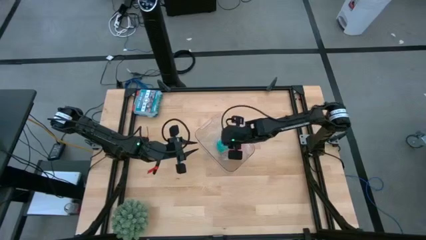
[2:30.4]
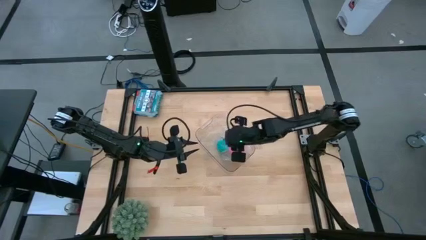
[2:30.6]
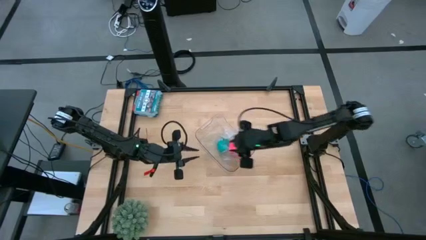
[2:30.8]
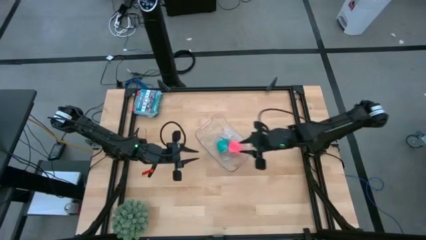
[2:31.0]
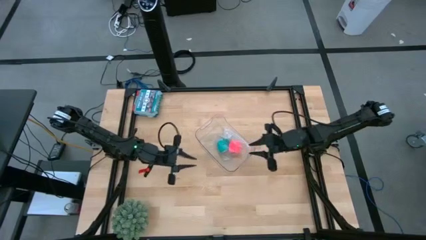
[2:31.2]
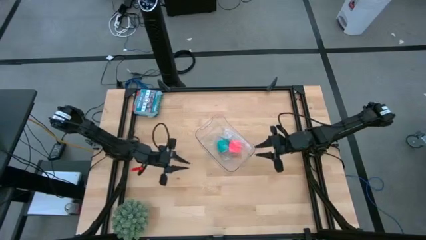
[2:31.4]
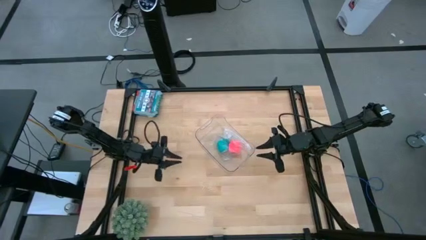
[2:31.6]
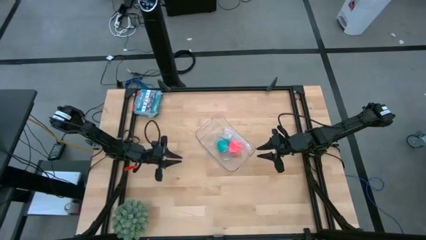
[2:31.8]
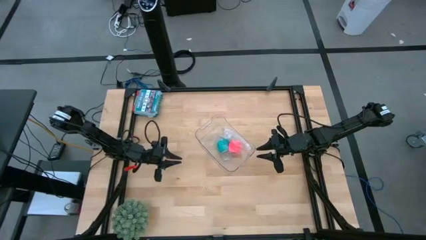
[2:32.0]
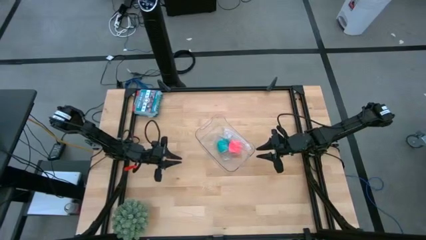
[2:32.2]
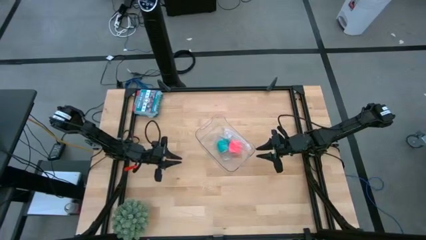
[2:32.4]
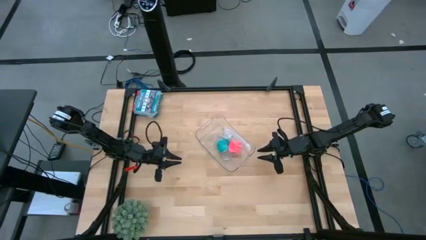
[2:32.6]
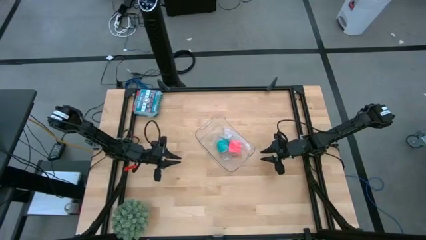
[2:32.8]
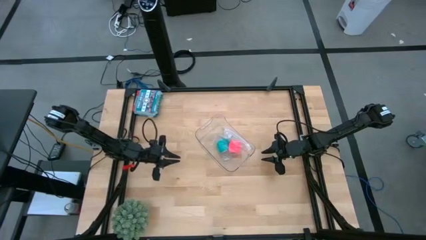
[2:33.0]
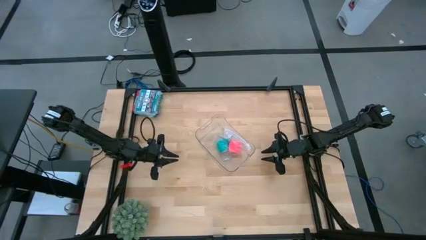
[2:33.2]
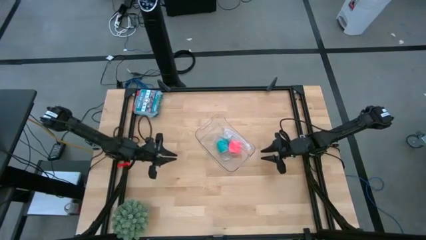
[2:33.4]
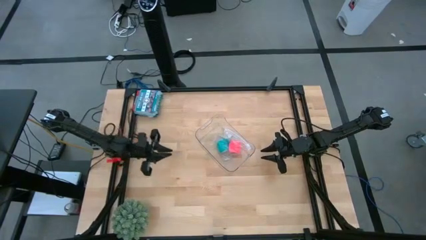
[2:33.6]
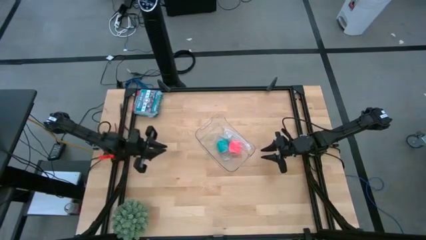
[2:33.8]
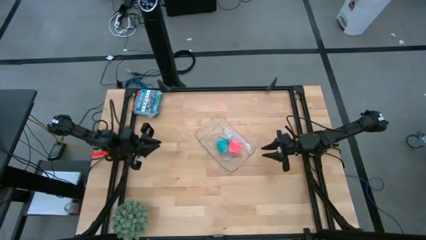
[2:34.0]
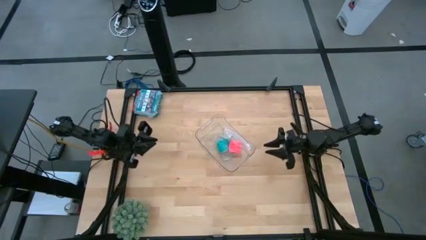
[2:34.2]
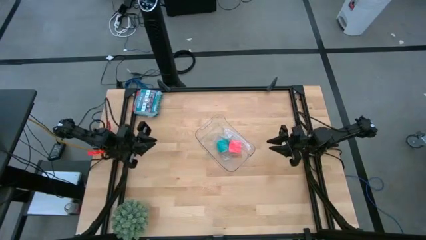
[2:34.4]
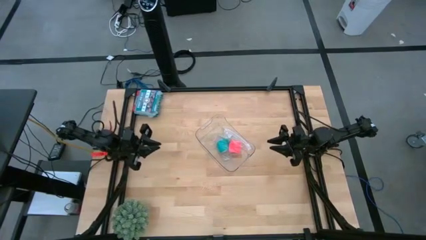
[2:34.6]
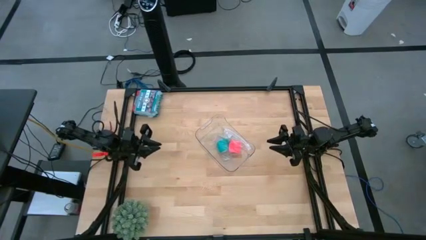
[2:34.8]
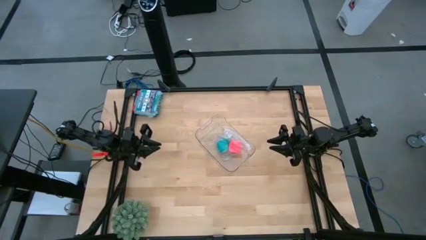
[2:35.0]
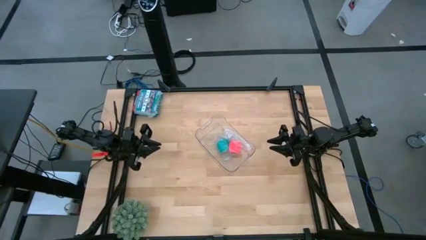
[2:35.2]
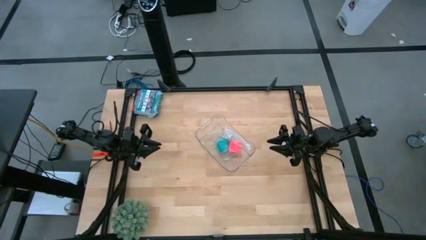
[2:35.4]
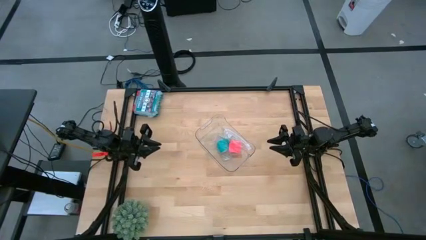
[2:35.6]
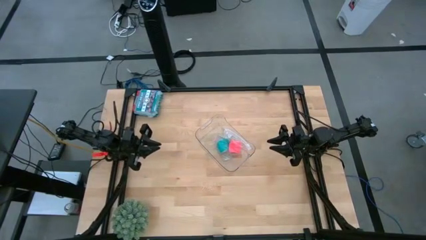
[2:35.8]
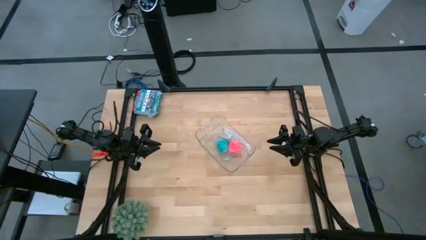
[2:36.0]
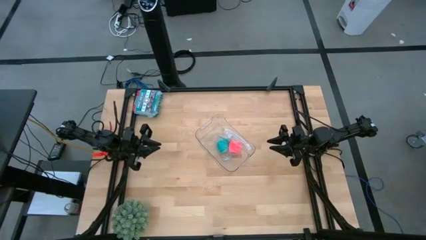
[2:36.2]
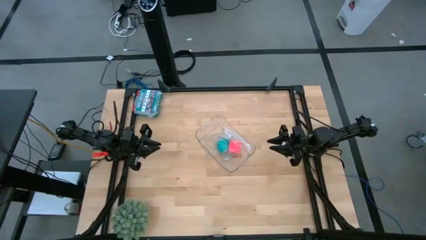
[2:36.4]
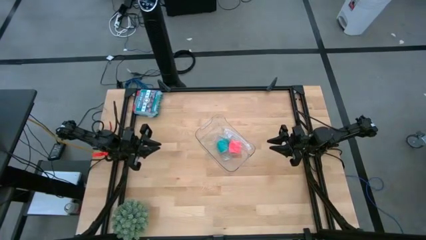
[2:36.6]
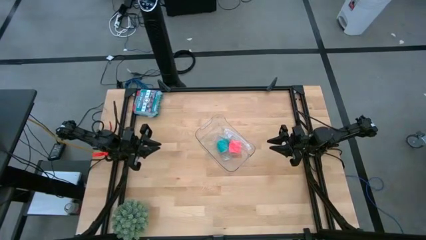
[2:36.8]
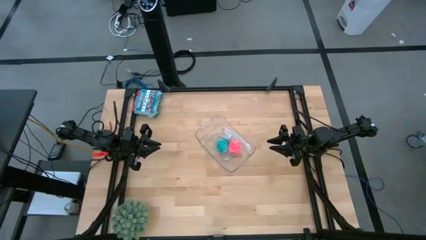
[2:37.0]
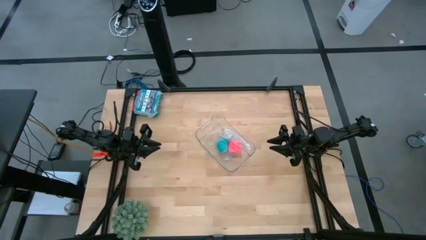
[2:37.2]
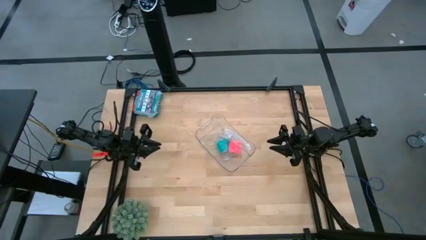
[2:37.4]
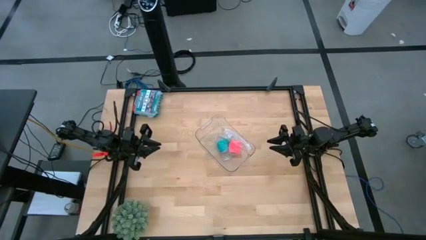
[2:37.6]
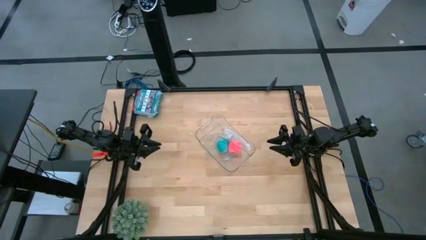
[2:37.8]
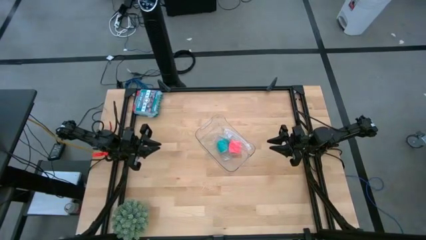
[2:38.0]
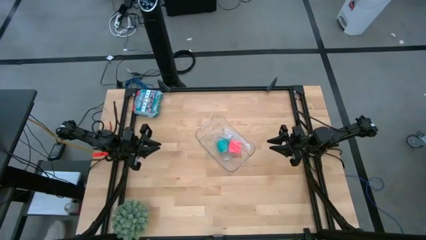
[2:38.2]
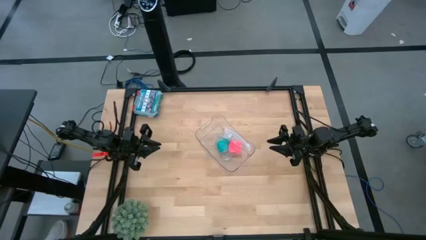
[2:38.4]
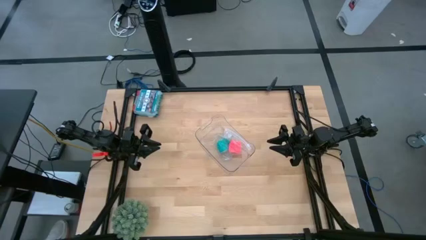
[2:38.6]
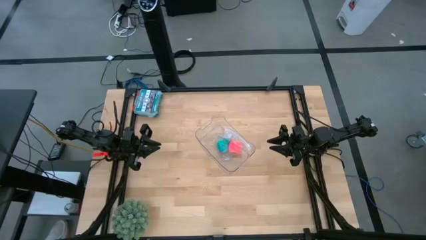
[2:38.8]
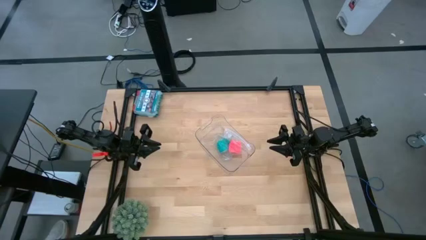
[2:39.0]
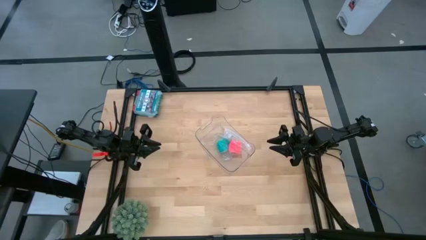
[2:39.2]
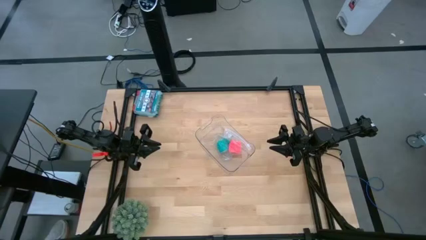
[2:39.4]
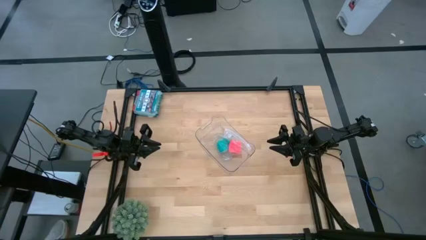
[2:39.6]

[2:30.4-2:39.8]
Task: Roll bandage
Return to Home Position

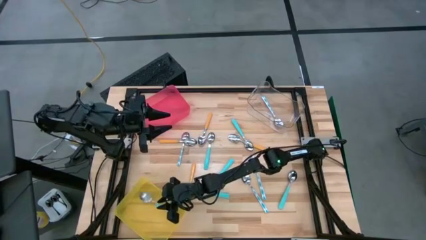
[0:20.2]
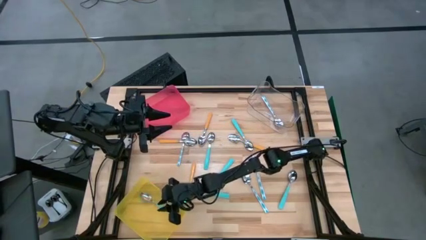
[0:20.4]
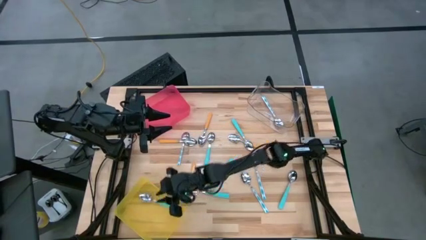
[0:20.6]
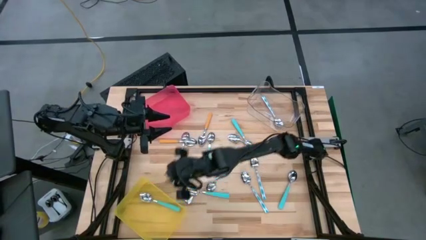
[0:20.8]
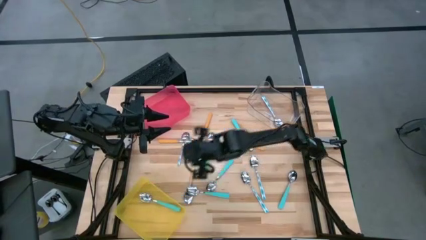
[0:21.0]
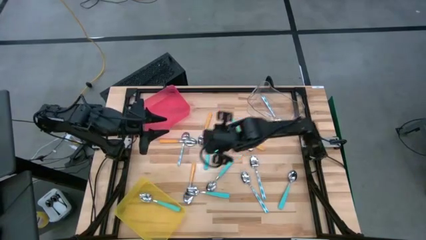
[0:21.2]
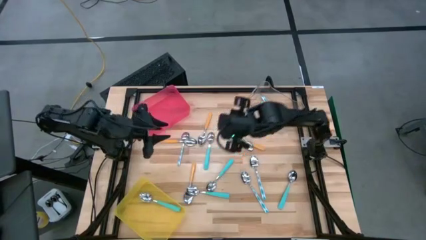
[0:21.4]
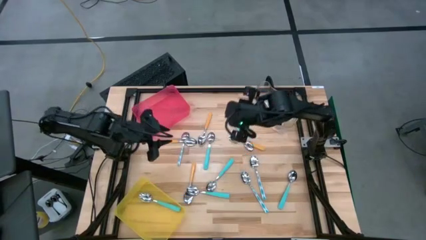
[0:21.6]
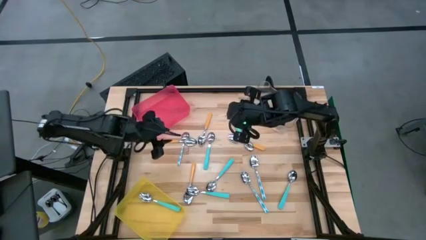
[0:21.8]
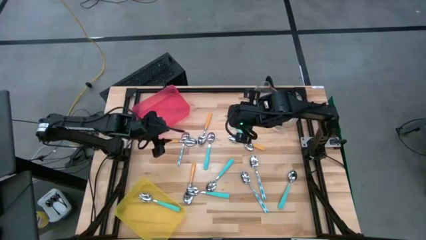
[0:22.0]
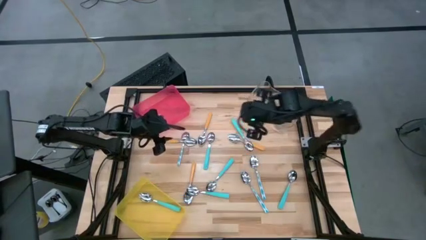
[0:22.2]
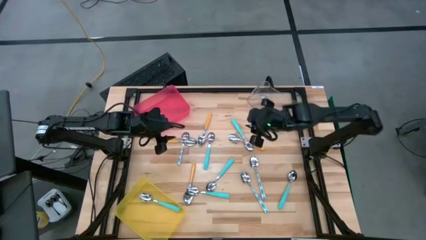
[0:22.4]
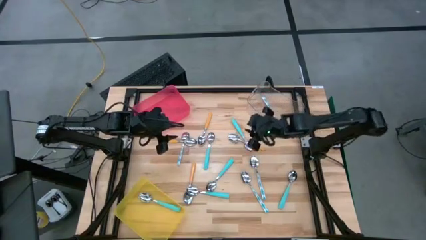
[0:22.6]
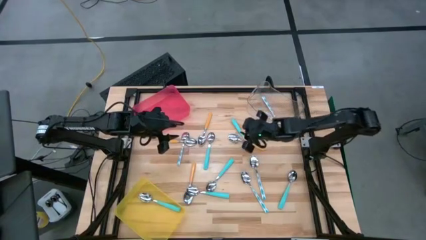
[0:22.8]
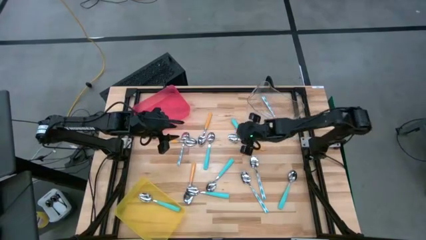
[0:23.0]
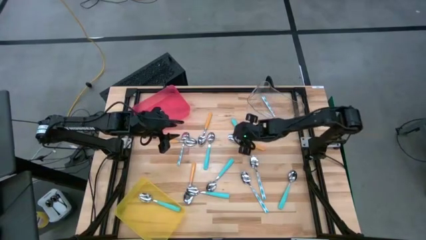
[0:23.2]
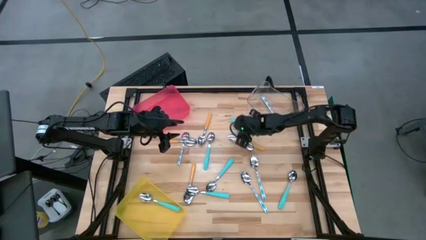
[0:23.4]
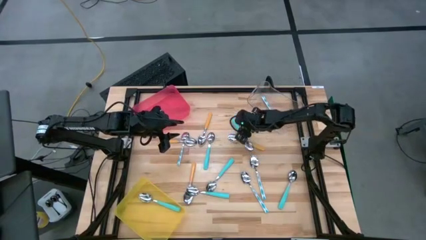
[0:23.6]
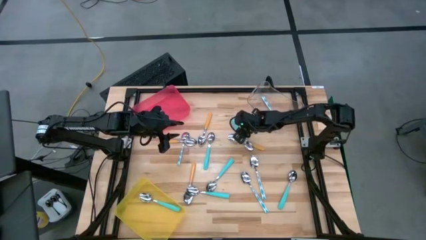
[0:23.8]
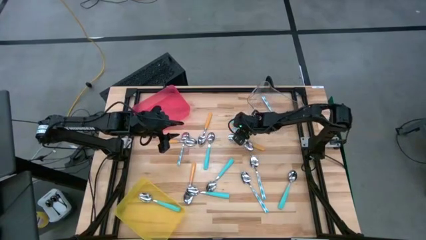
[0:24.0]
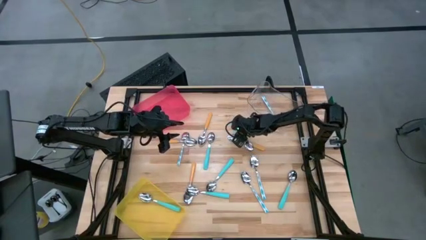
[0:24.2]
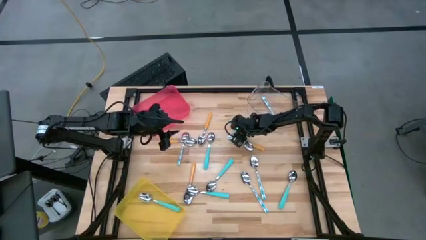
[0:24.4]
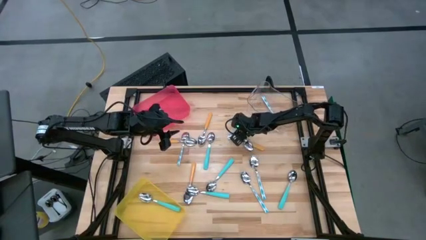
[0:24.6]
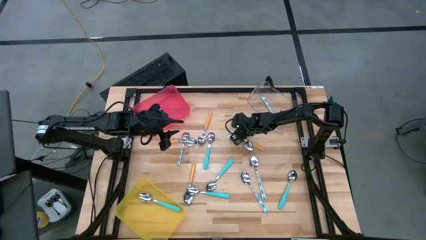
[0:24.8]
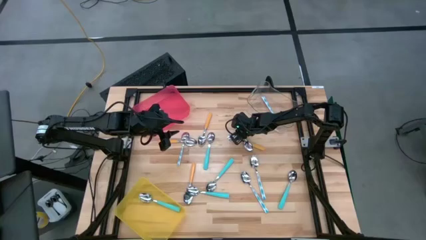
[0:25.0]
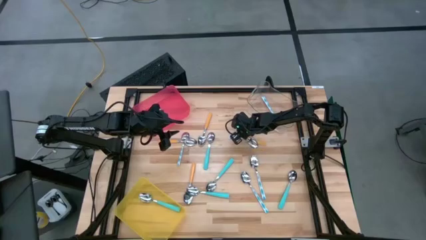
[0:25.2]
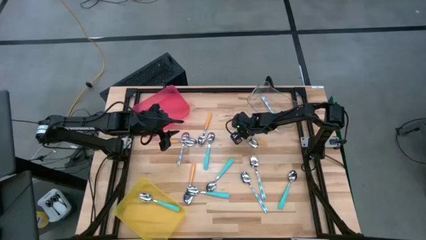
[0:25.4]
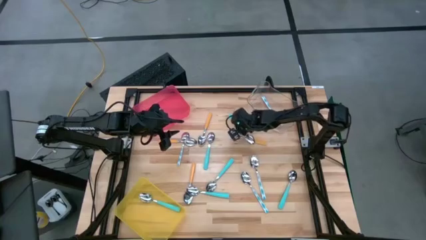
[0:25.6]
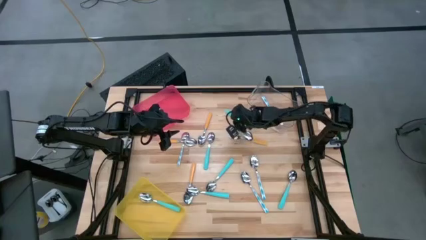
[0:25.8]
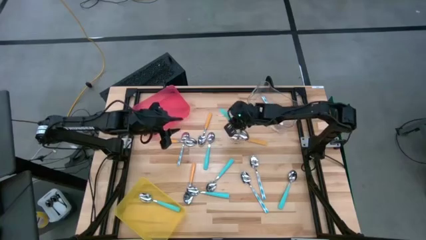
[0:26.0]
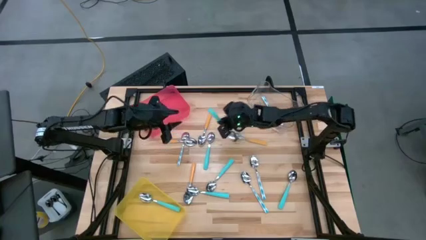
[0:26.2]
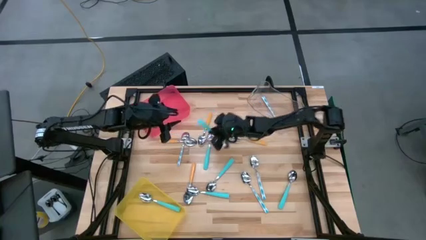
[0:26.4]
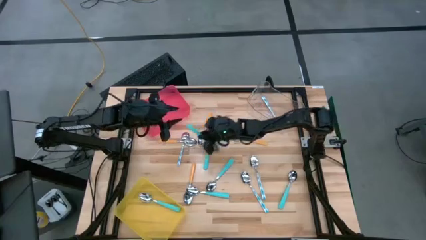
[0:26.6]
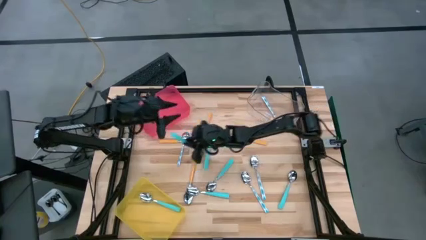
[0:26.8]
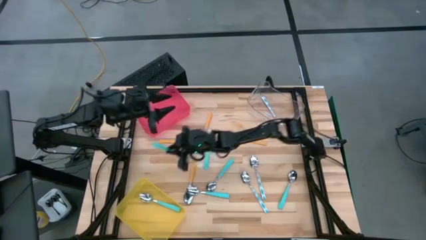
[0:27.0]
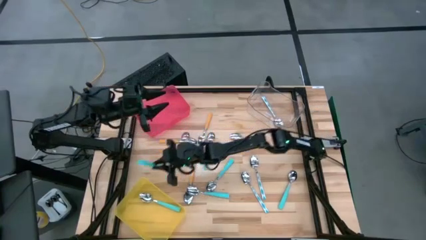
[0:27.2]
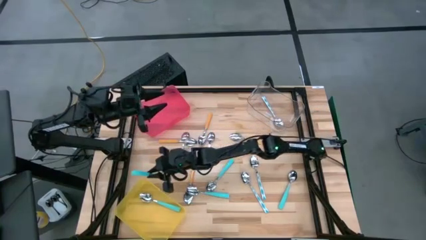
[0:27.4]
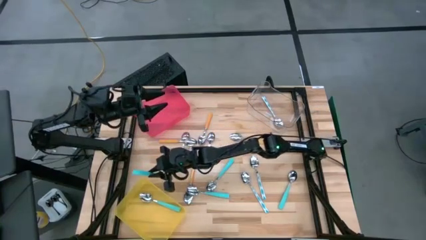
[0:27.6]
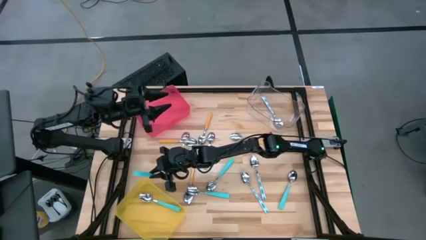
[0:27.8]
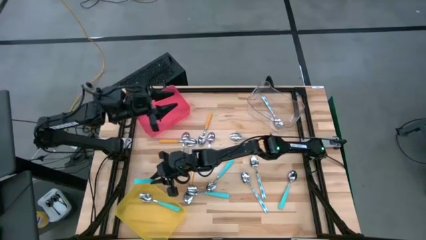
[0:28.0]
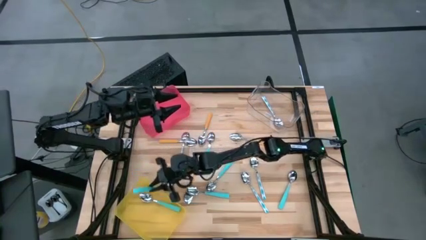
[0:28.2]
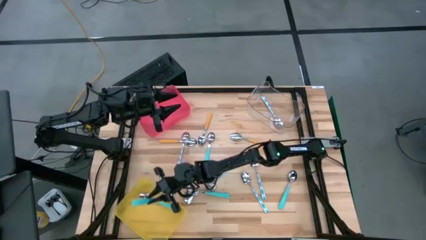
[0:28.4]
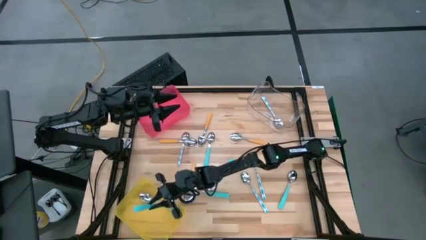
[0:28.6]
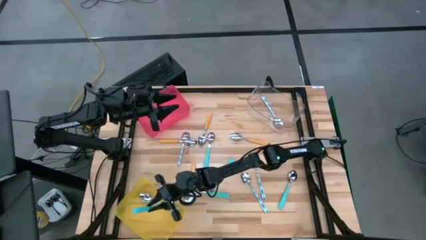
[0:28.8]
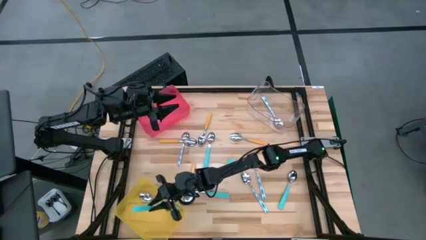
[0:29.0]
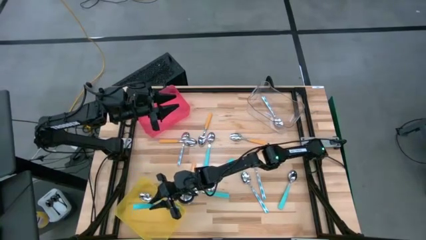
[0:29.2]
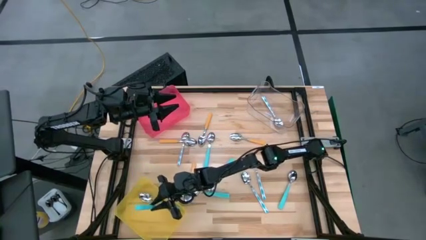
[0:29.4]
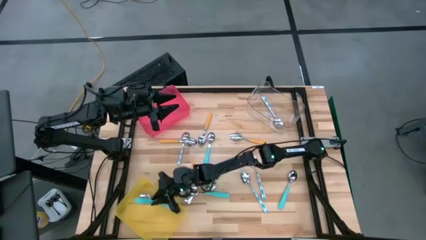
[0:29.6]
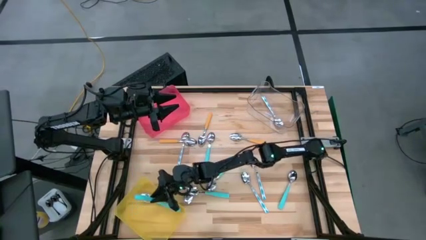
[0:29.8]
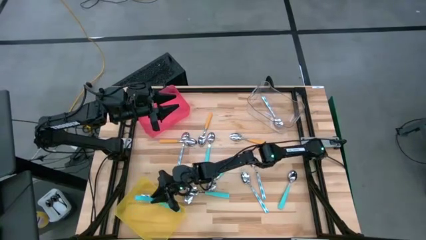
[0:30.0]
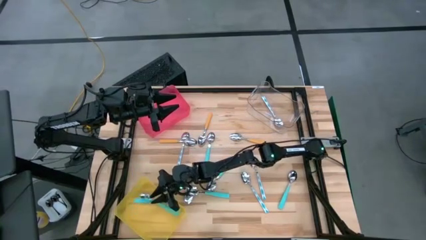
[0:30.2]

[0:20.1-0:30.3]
Task: Sort silverware by color (type)
Put the light blue spoon into the yellow bin
